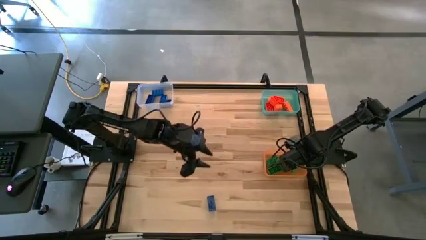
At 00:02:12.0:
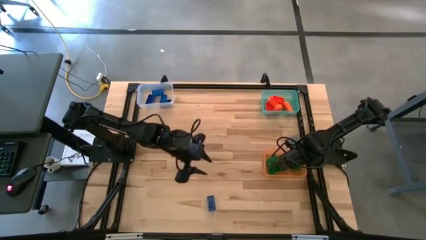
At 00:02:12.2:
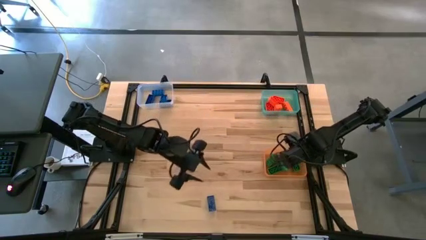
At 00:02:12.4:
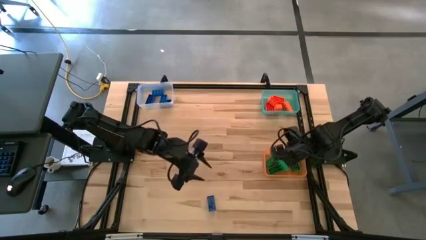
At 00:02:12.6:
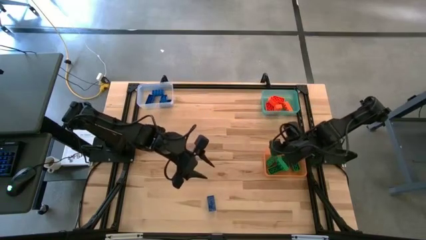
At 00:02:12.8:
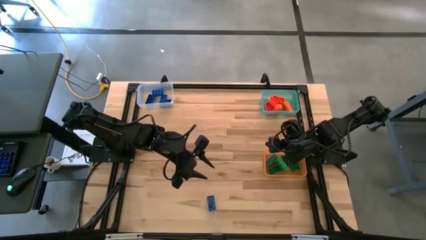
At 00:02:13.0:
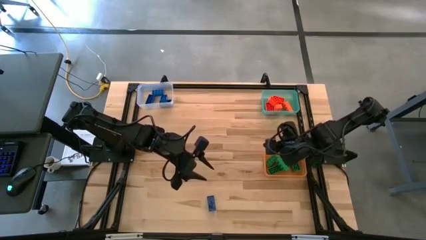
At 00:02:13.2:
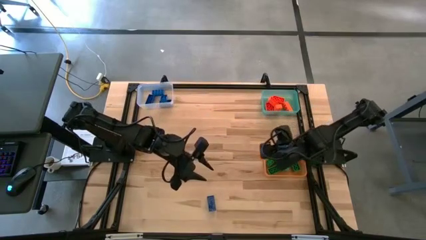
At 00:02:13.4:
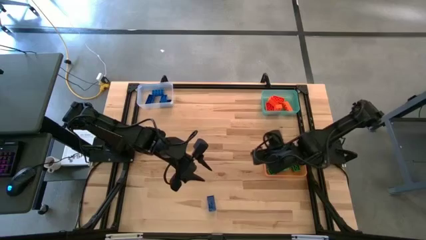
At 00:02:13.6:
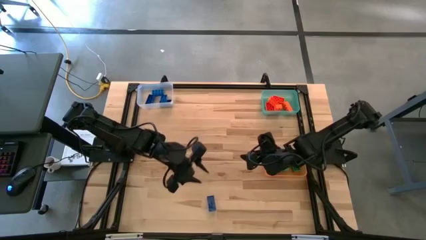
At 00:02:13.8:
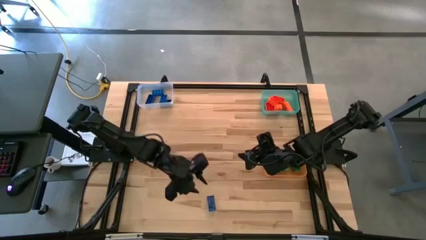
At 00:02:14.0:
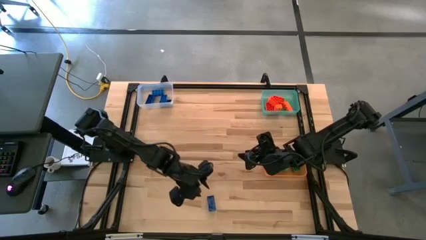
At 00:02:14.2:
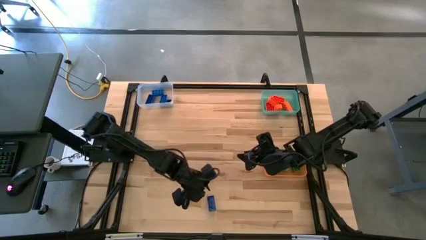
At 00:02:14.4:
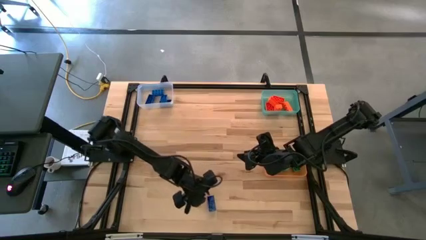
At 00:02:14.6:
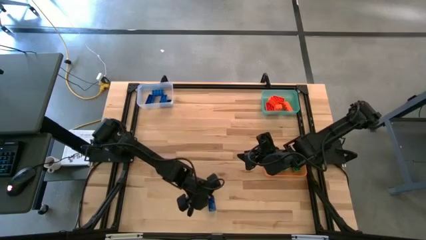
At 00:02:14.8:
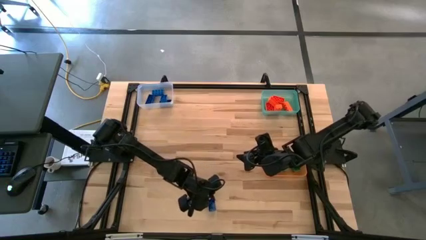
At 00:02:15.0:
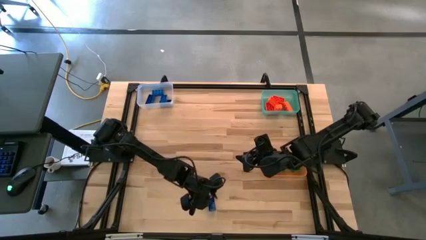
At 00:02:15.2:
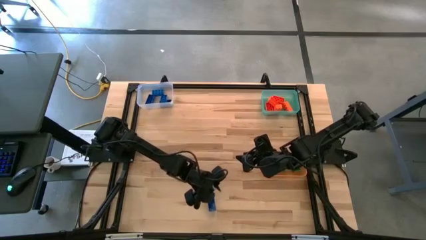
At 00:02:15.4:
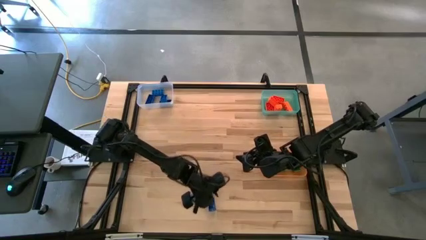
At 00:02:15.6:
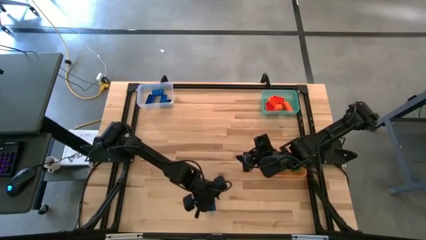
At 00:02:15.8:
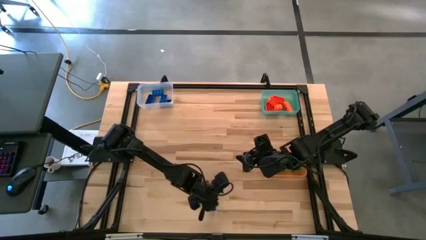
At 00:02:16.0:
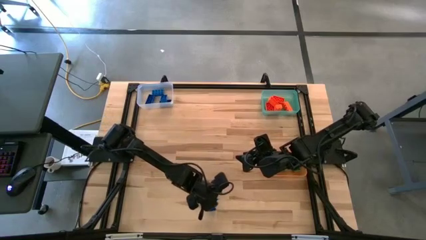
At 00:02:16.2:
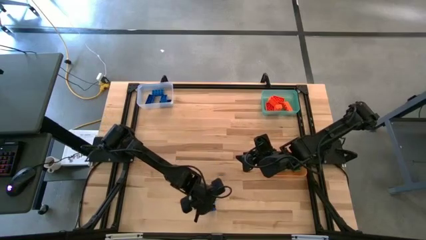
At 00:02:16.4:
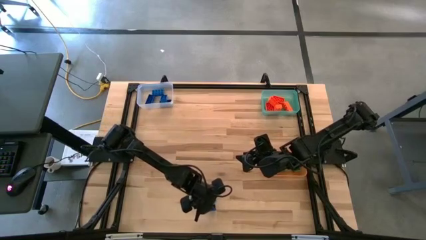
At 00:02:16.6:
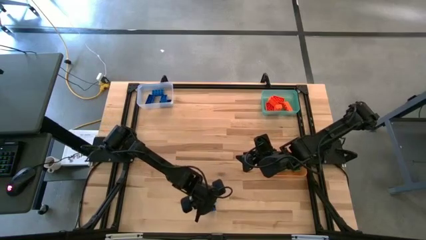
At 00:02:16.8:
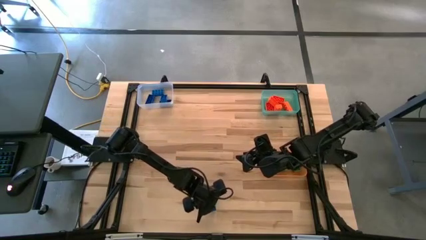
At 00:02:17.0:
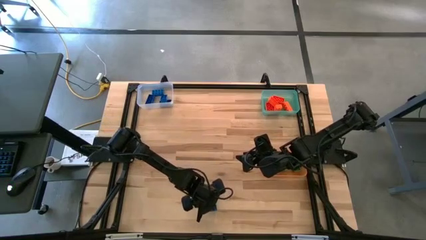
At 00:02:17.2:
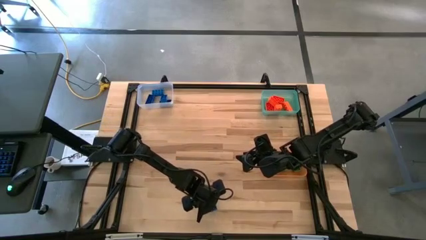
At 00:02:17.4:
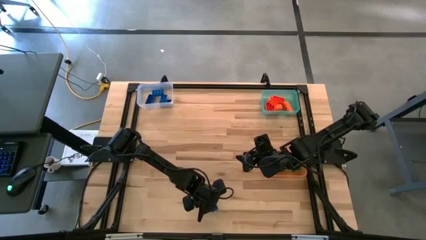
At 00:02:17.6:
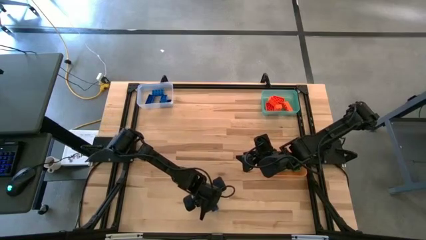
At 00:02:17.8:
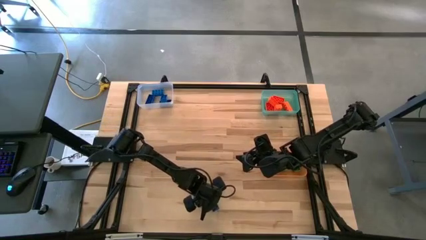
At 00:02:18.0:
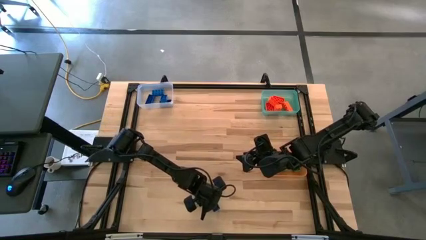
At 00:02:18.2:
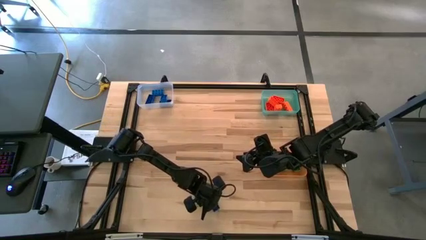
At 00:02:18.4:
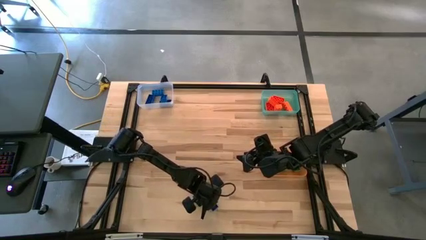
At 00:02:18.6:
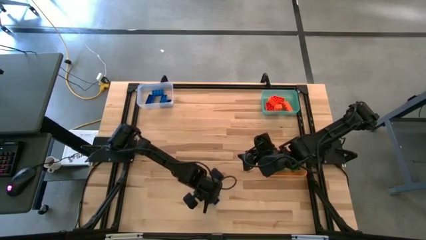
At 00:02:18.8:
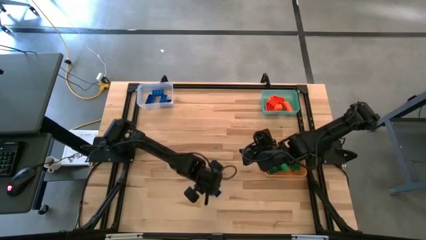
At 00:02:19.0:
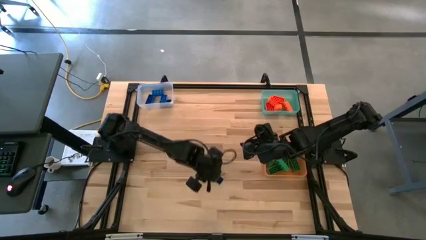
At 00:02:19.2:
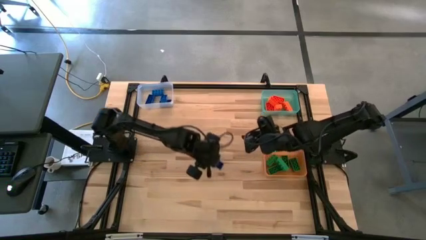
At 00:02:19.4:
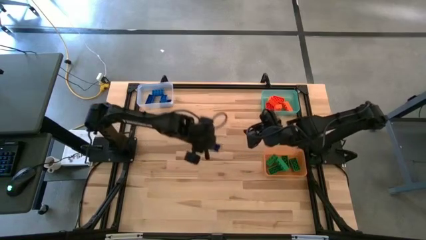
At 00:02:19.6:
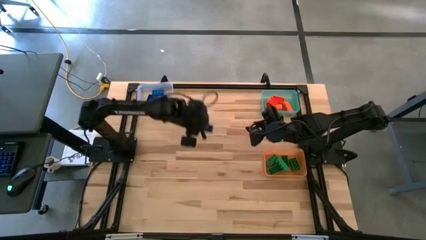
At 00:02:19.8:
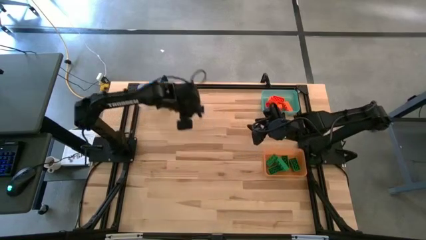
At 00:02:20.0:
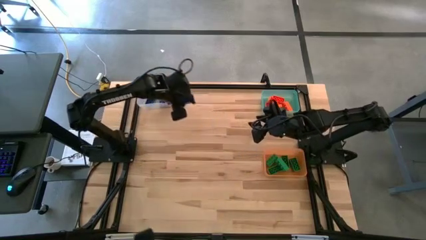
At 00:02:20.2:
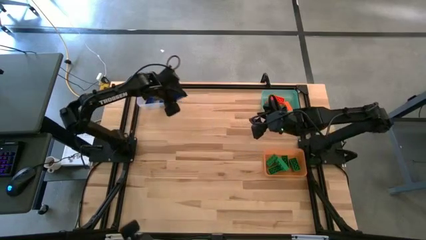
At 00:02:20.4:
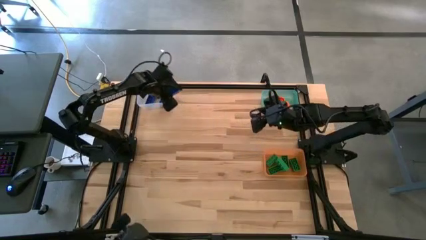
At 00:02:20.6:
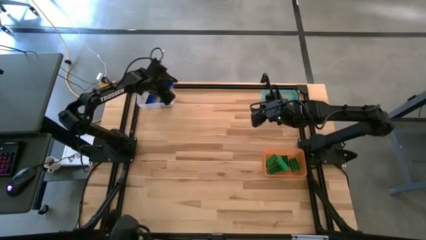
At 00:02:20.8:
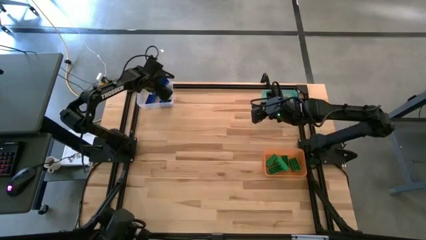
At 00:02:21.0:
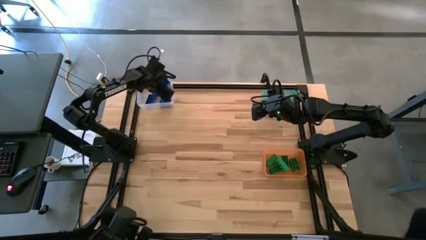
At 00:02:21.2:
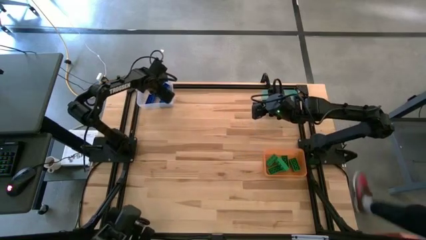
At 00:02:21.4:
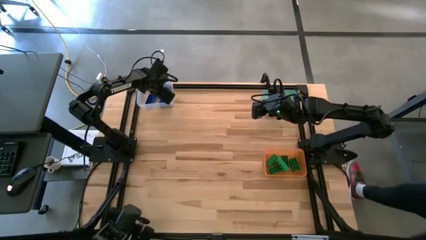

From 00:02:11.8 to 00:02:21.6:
Task: Sort & place blocks by color
Put the blue game piece into the transparent bin

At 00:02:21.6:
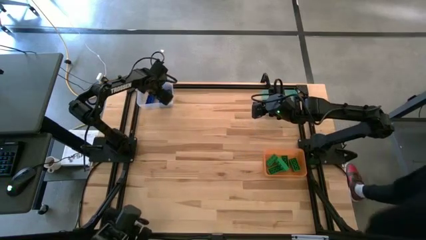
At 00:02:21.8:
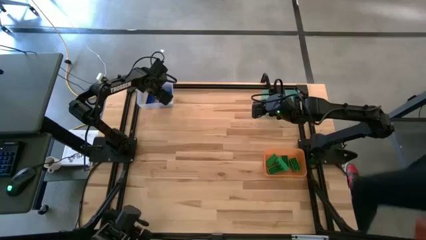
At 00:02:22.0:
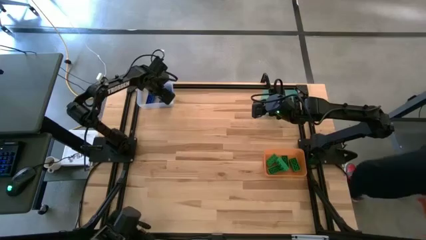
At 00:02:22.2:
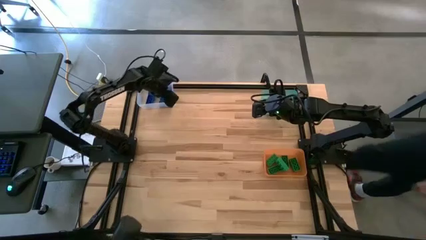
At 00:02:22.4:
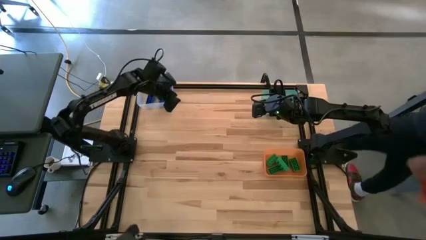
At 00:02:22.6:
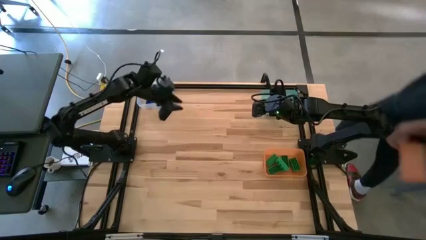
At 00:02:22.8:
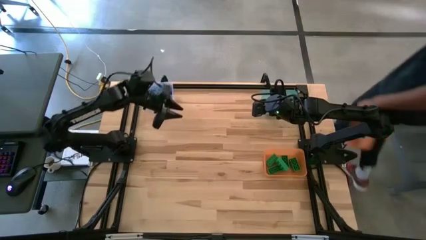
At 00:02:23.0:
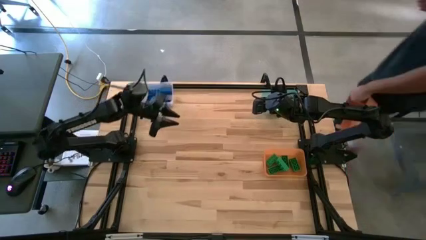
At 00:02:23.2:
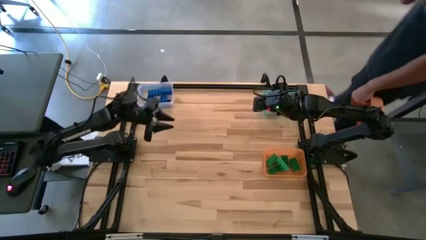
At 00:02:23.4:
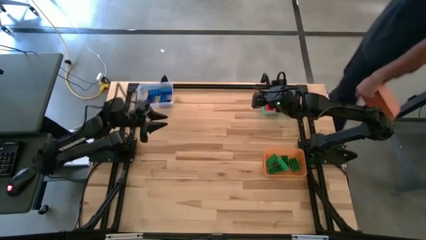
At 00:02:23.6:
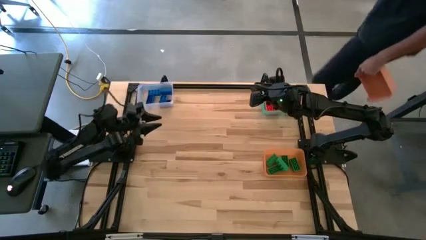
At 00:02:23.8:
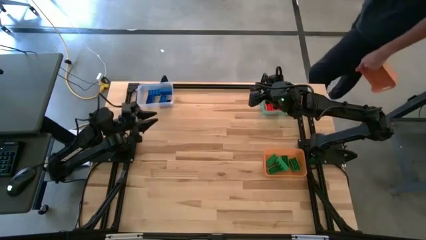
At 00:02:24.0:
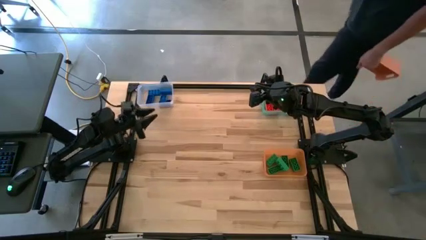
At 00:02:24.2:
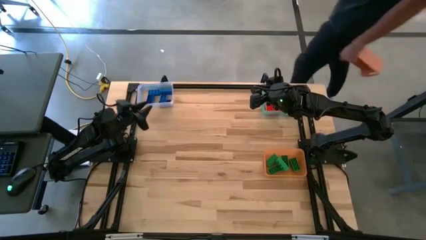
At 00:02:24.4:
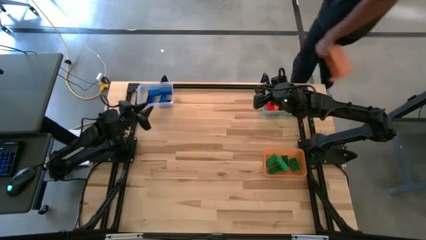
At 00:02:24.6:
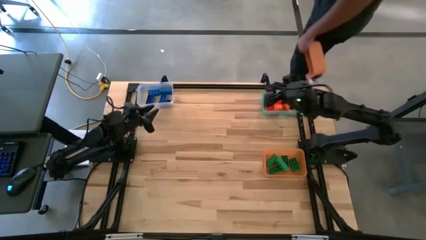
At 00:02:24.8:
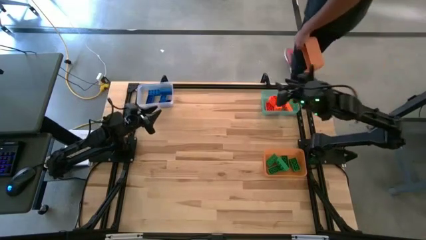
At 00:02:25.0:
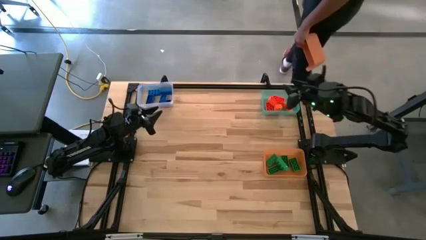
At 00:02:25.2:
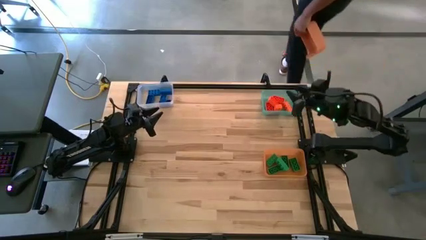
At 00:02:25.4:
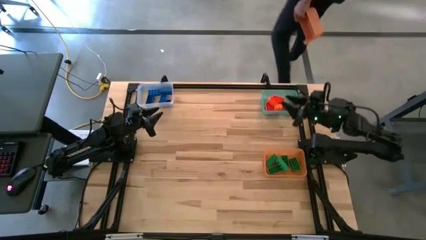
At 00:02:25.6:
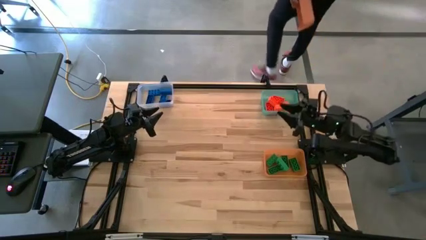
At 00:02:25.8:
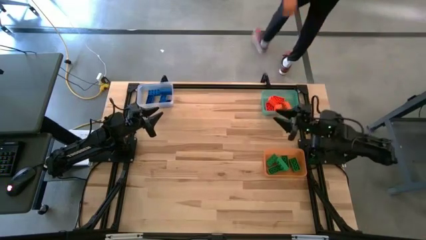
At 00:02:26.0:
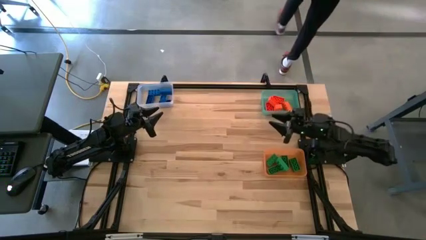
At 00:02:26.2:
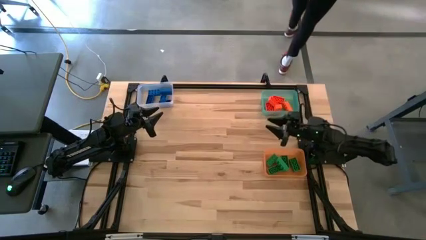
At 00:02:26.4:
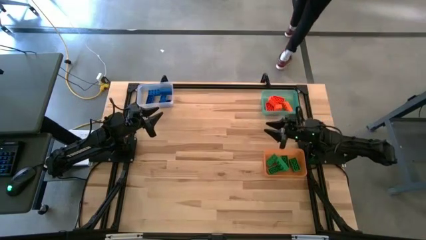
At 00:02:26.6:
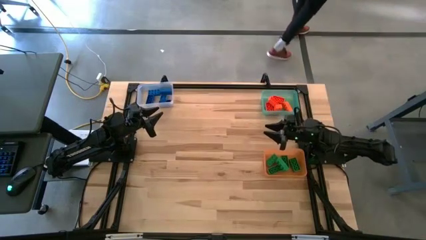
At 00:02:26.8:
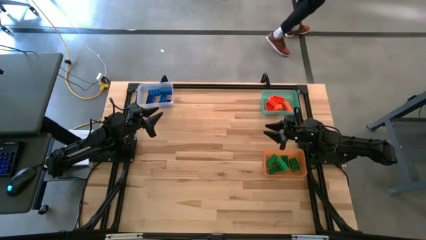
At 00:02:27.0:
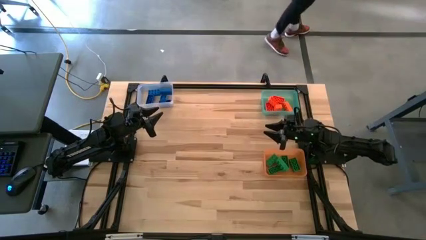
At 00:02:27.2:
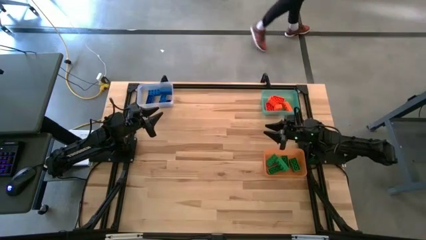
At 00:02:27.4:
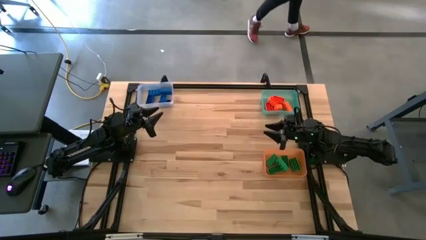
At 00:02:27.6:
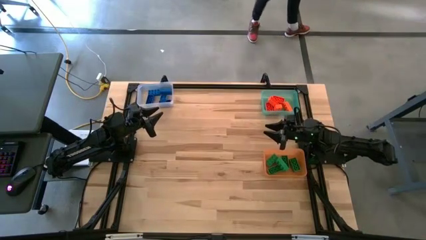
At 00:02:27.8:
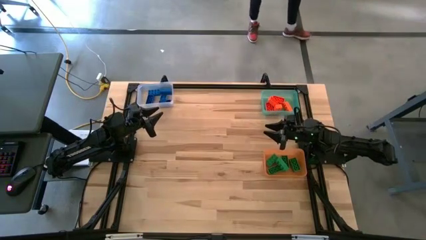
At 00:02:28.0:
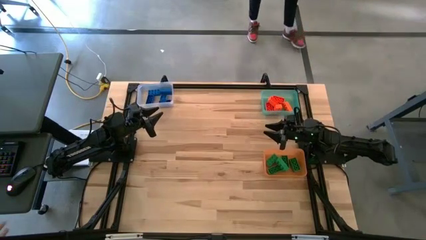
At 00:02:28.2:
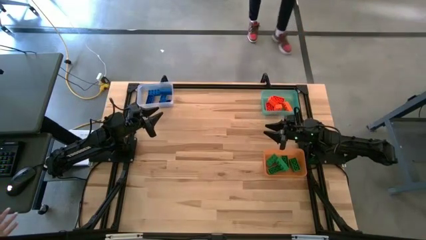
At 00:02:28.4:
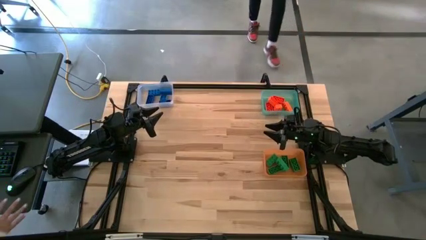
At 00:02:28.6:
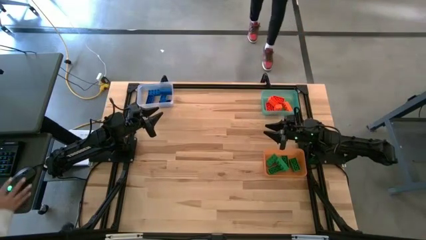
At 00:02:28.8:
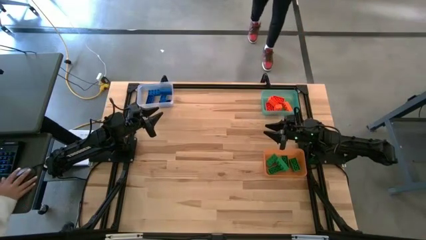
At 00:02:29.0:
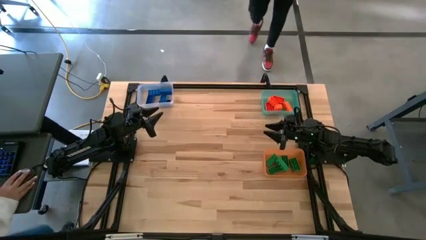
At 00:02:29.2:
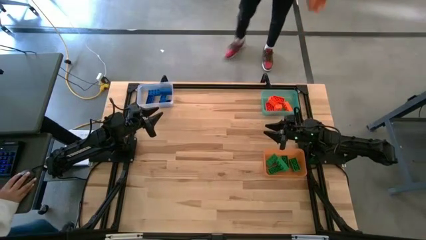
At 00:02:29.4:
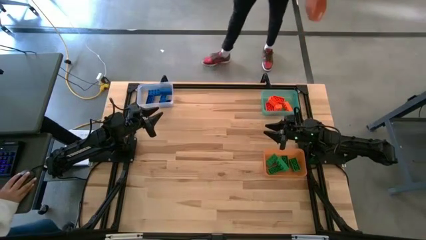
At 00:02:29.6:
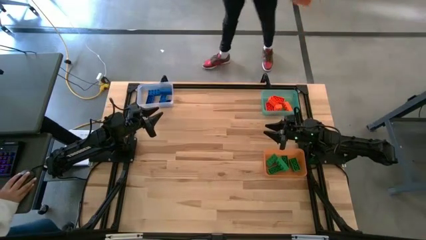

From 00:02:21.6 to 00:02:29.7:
Return to Home Position
